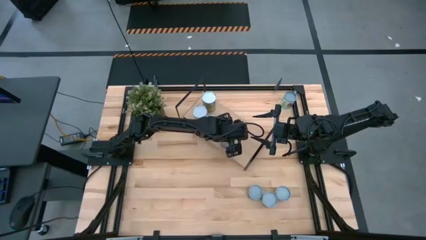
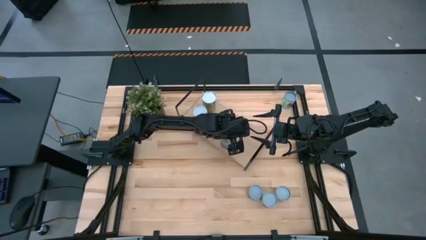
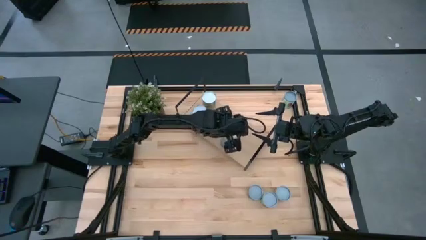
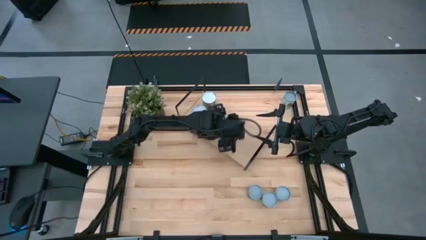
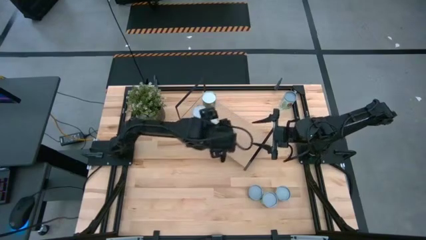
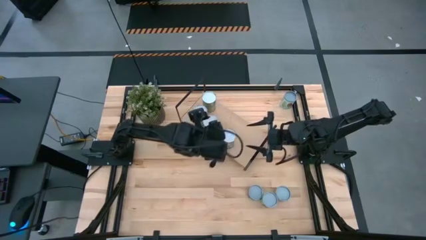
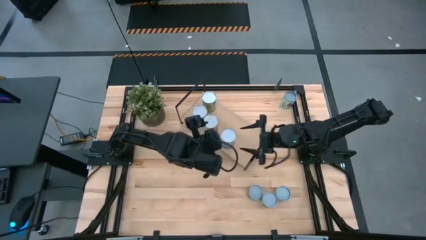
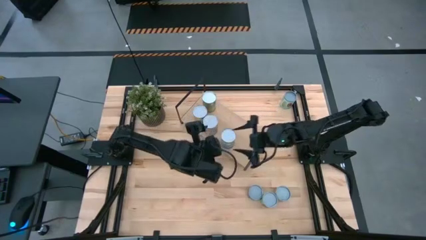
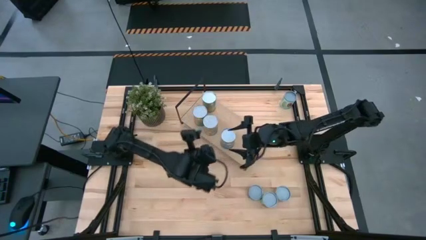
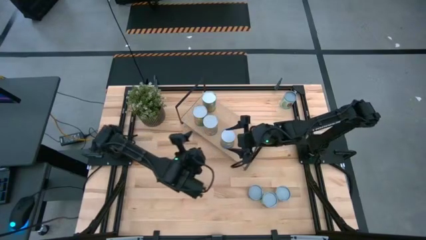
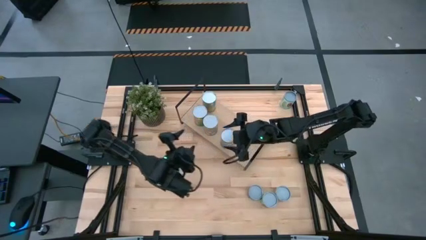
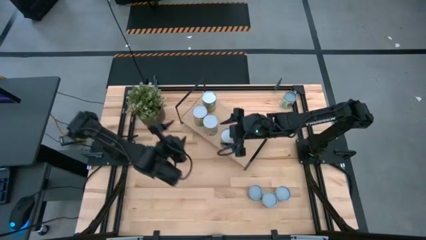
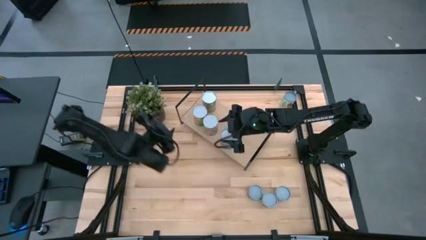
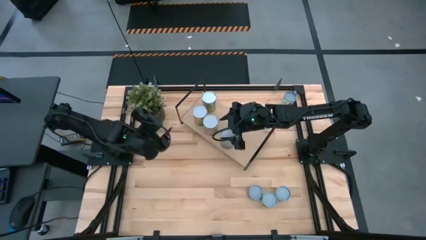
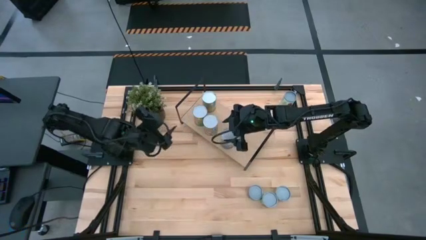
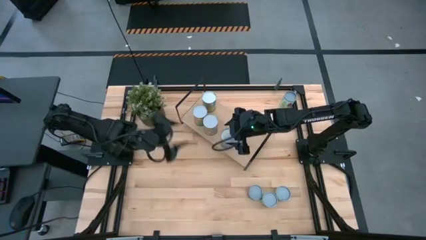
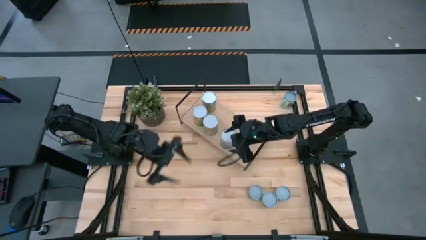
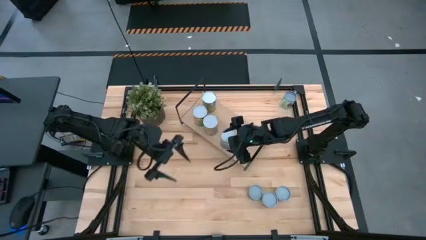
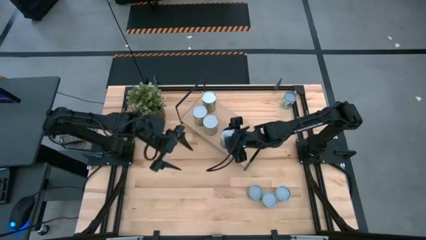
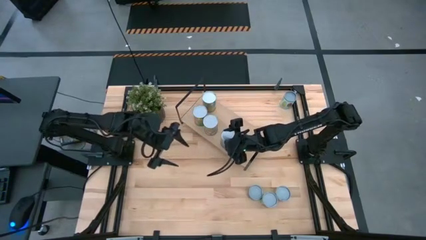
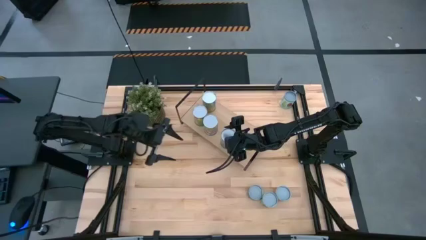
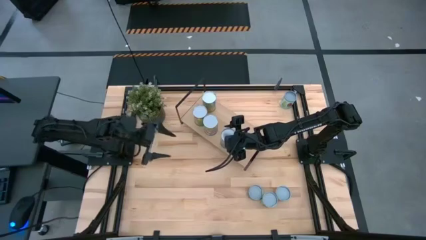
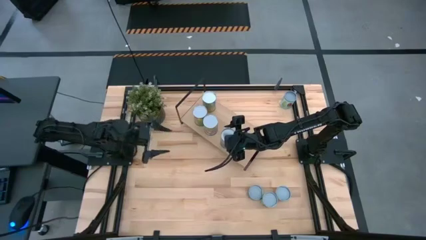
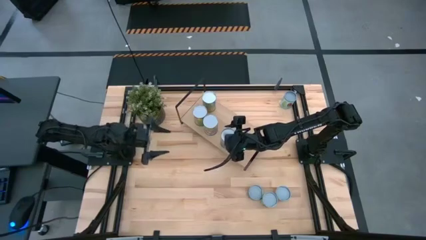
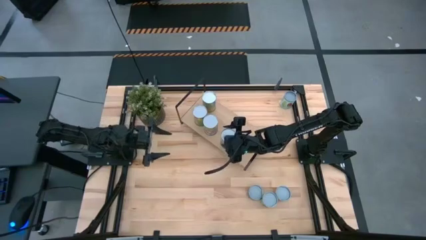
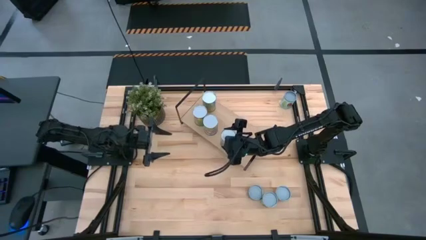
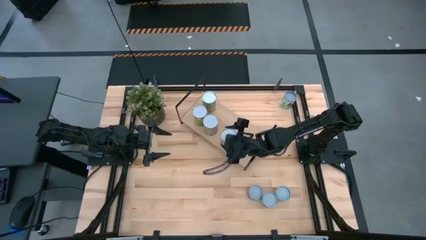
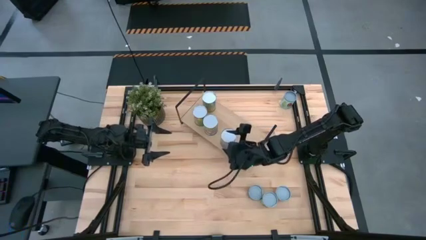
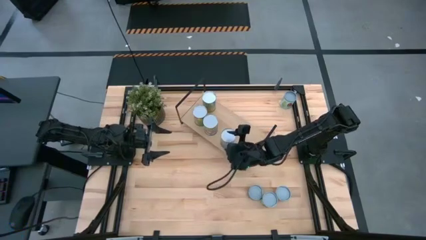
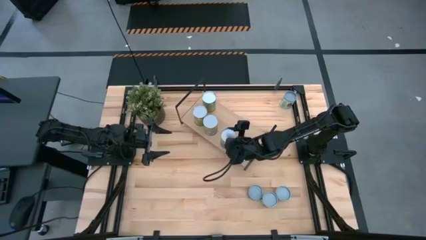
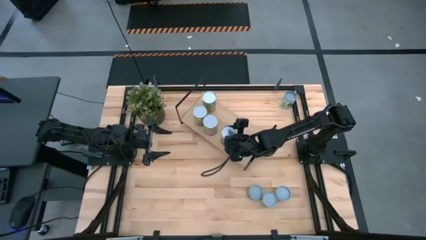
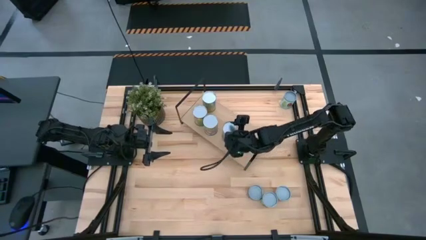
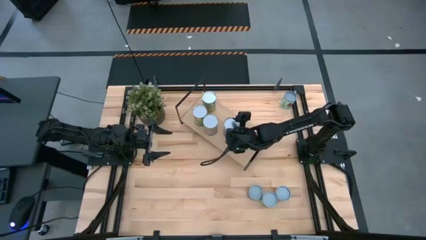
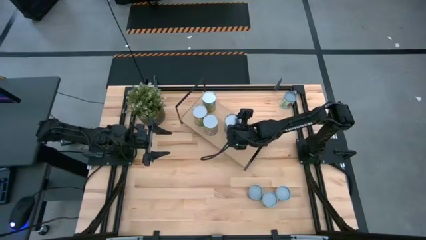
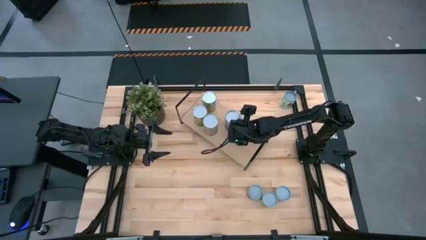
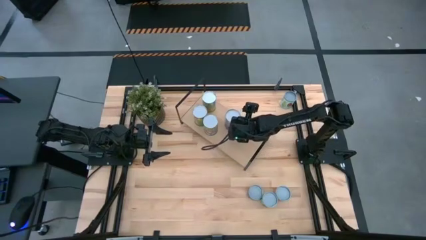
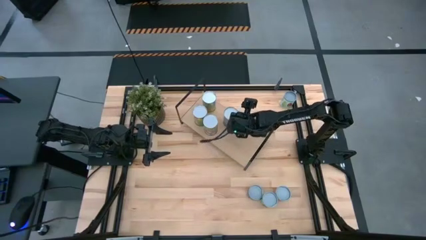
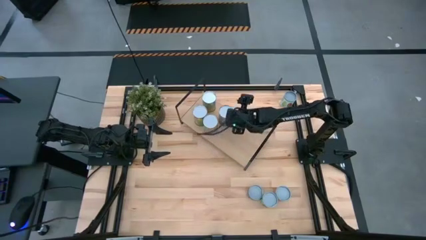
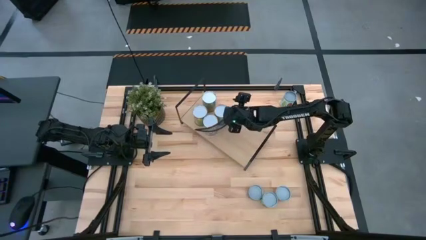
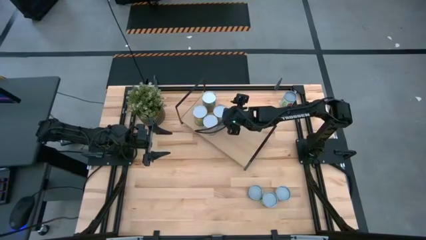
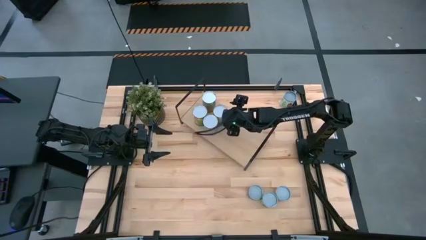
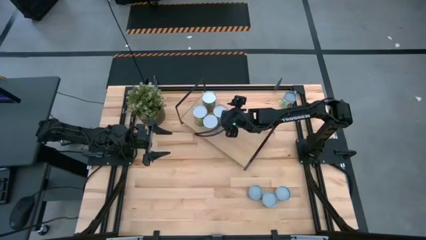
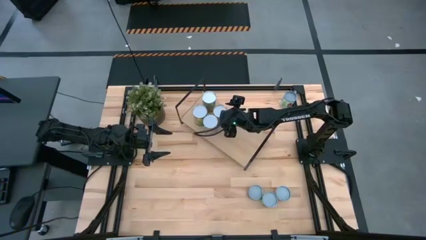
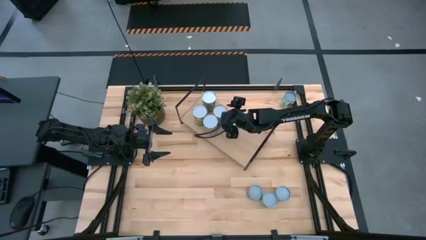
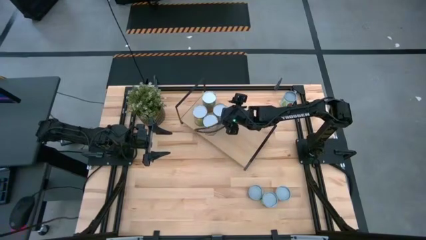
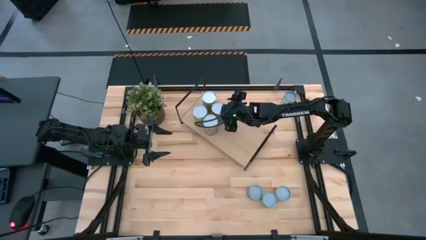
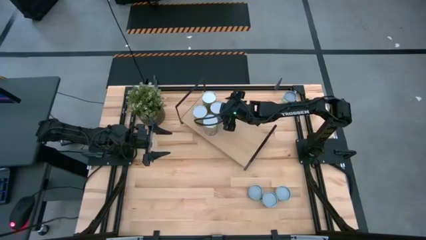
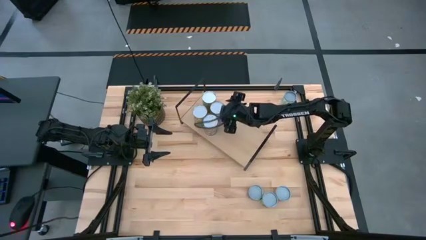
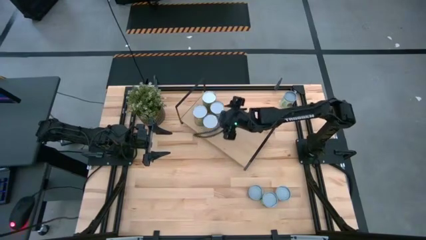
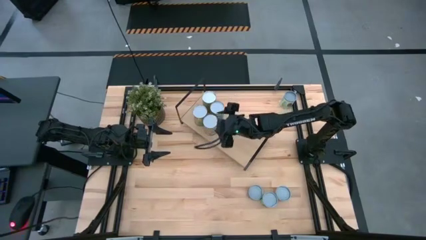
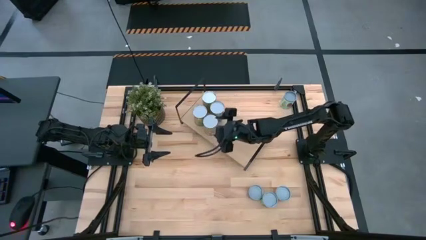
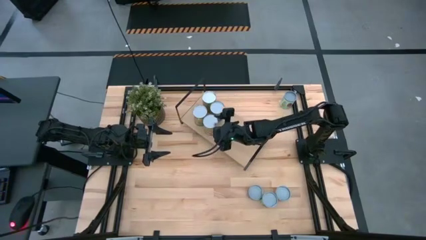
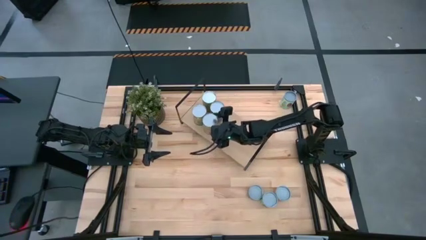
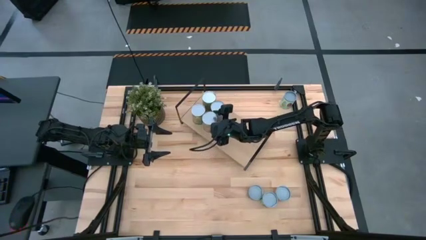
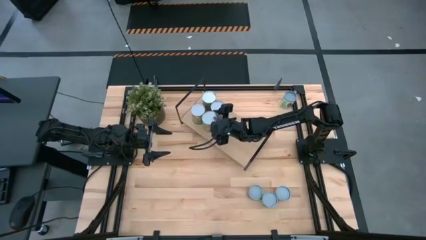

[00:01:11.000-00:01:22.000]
Task: Pick and place cans onto a shelf
Put the canned peas on the shelf

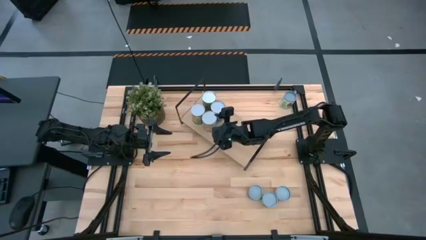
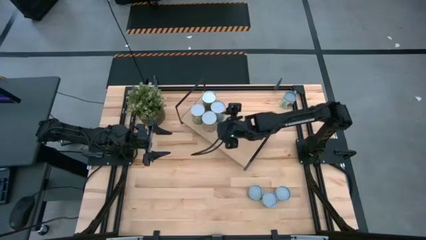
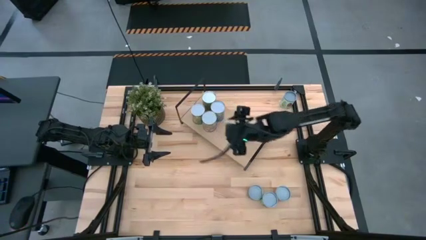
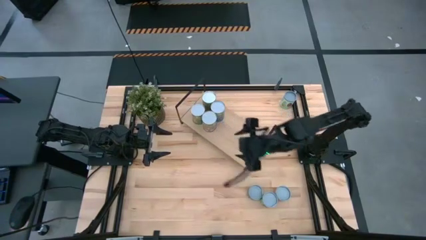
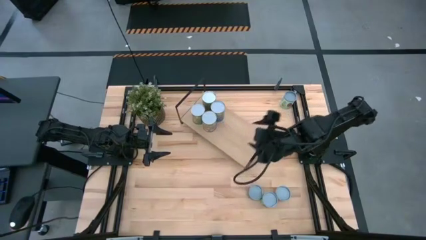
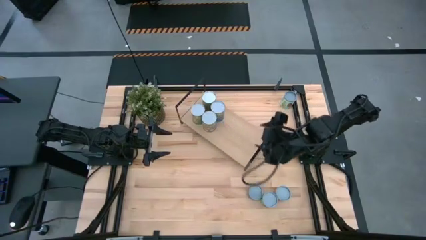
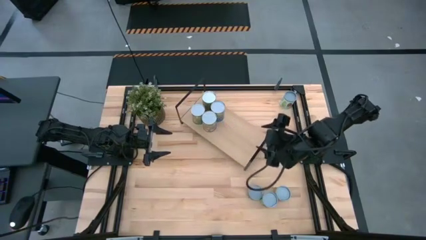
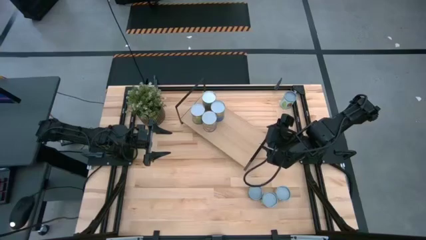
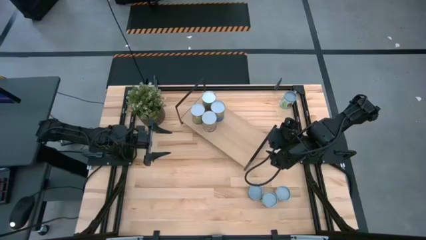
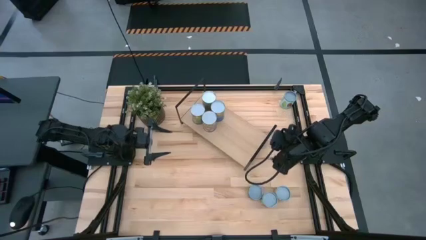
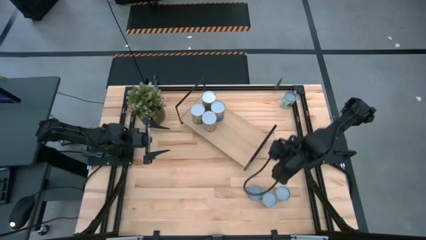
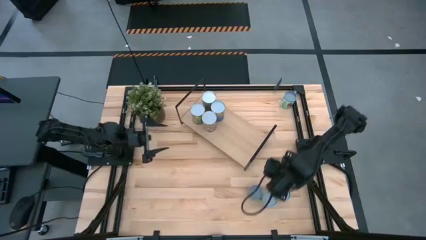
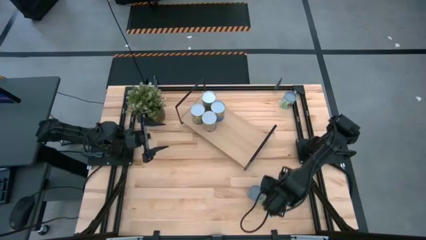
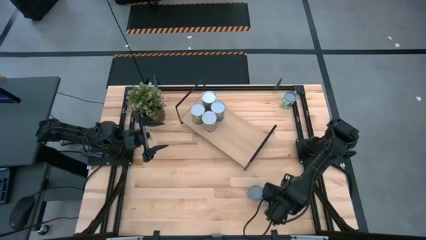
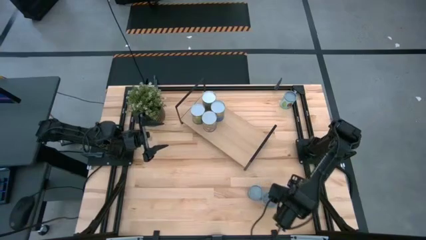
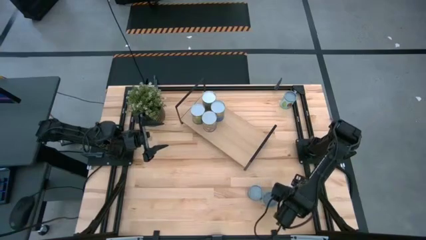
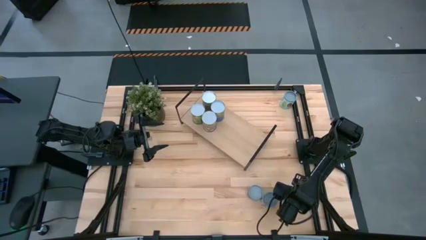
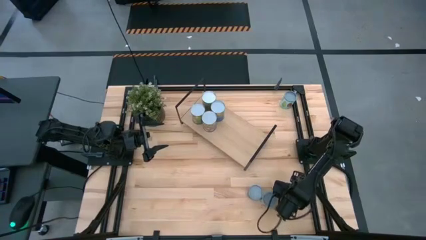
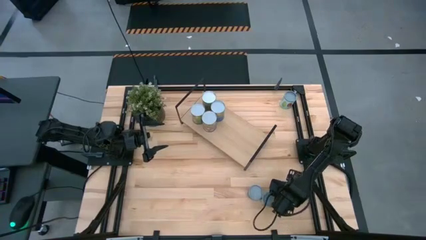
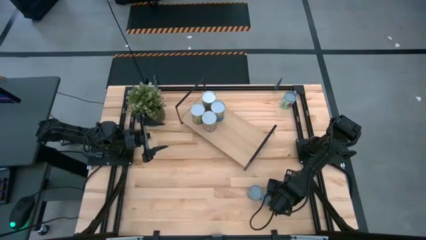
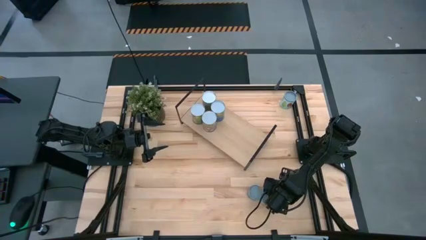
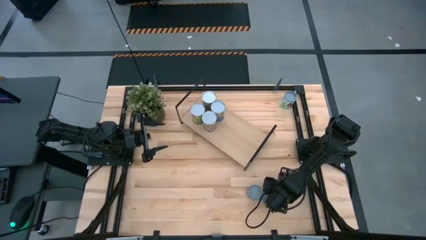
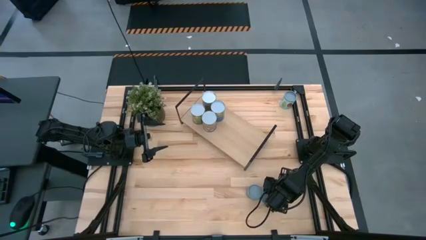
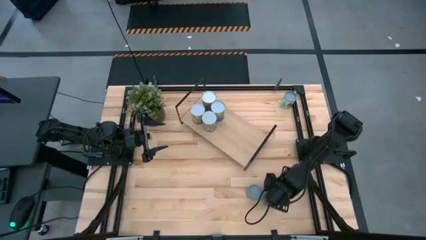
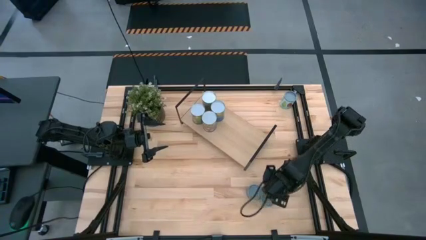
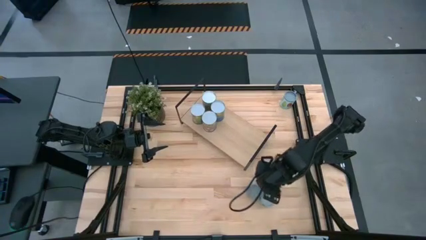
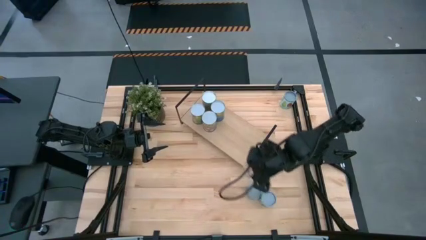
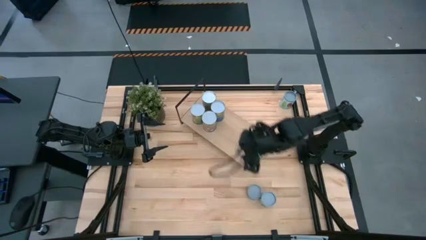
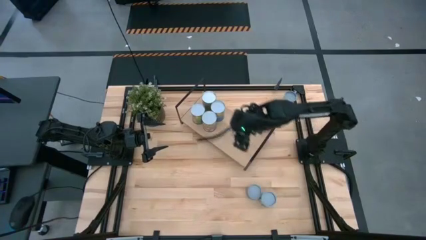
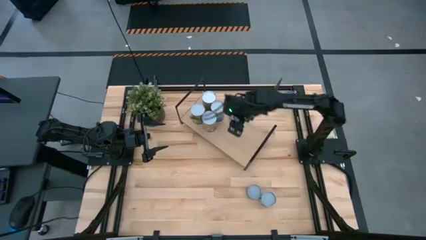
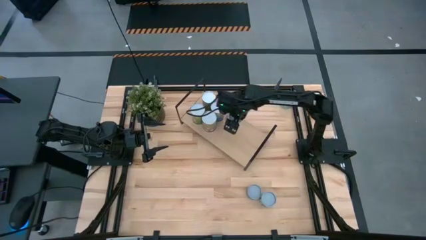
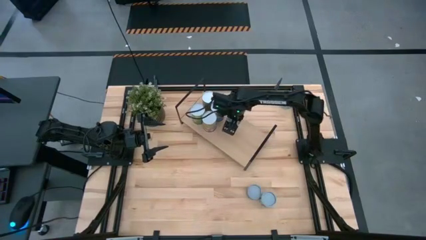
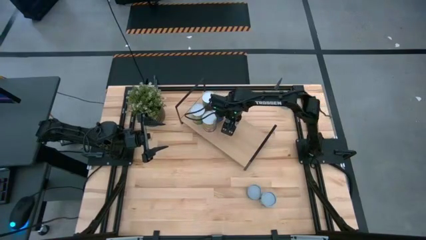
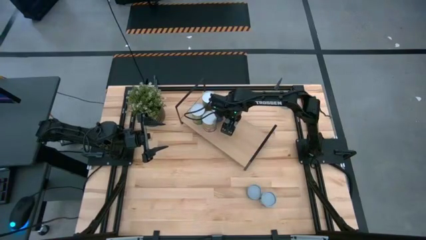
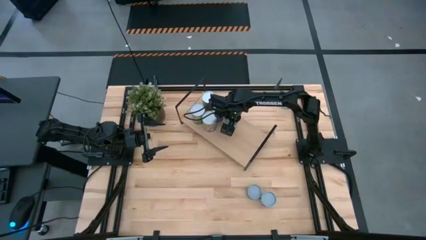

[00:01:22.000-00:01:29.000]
Put the canned diced tomatoes on the shelf
